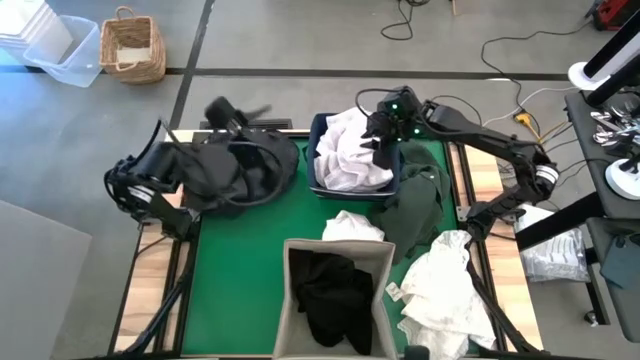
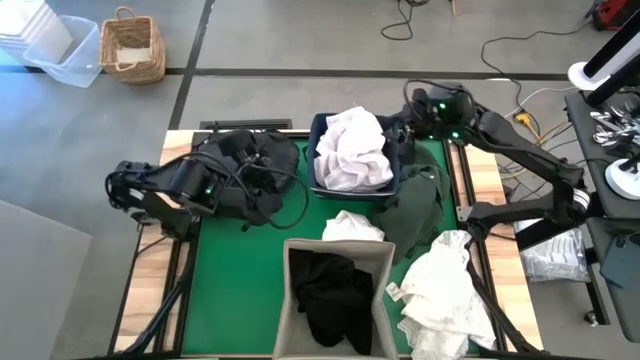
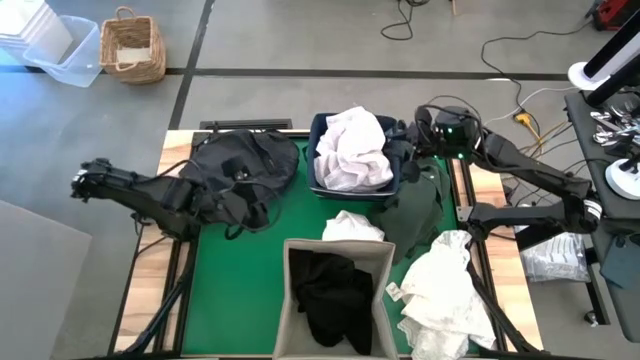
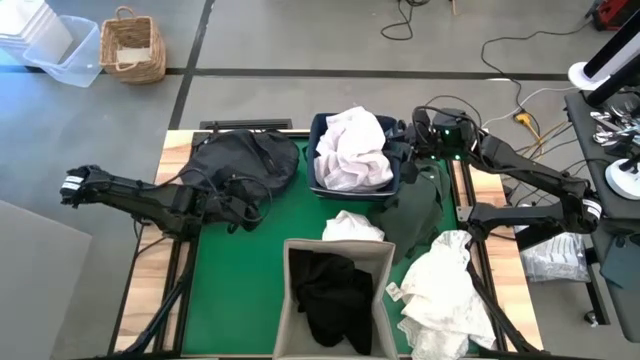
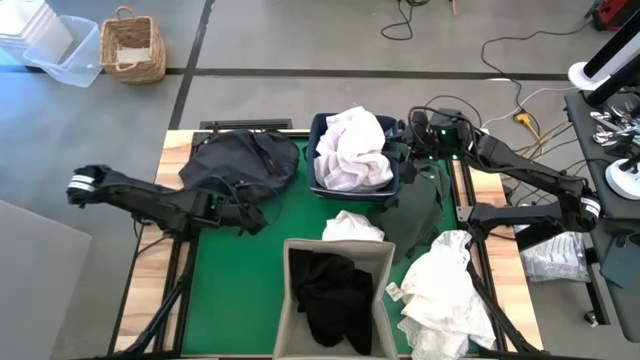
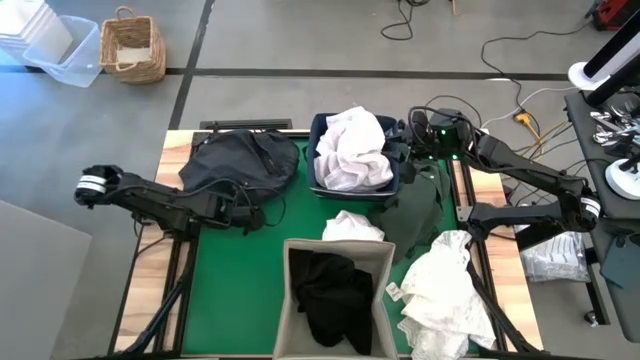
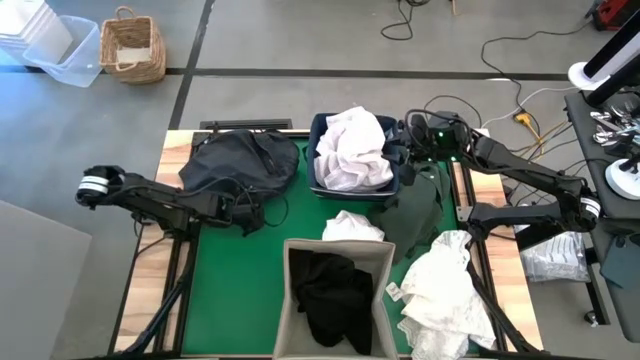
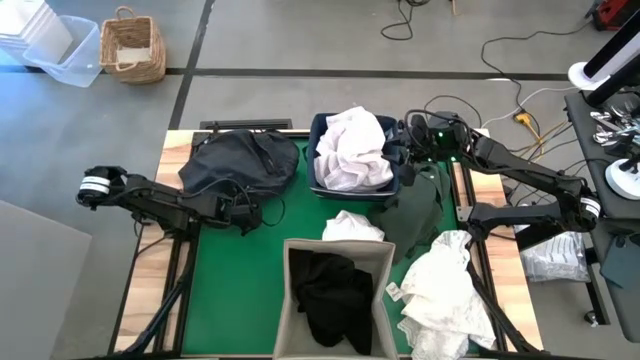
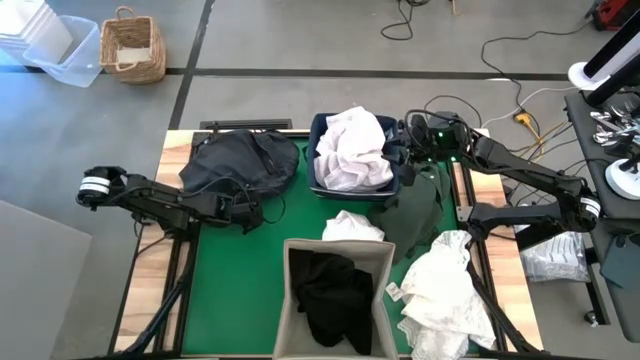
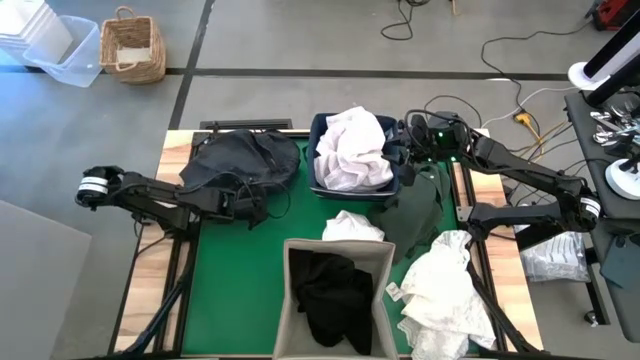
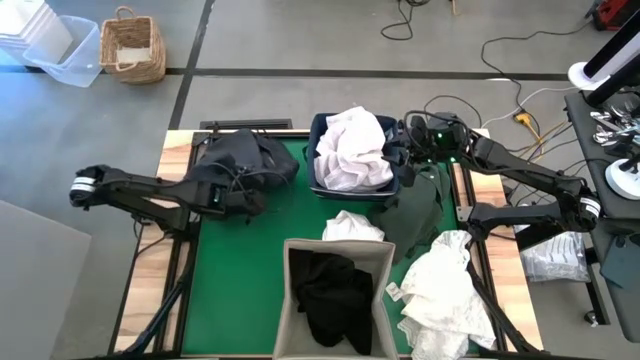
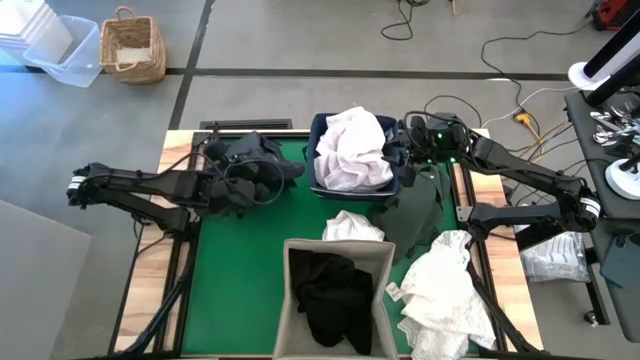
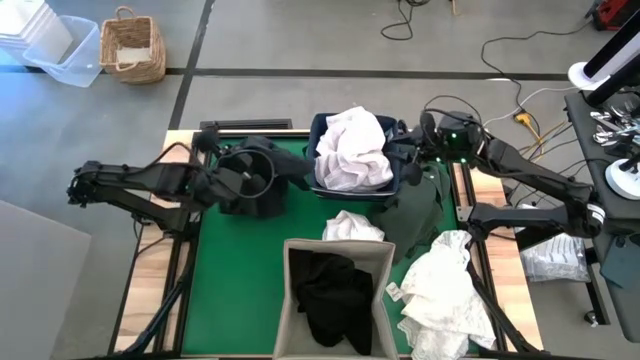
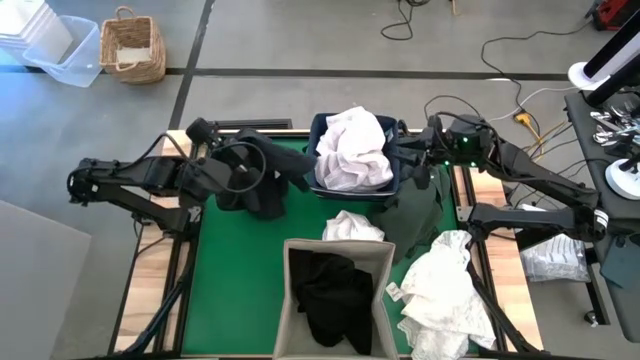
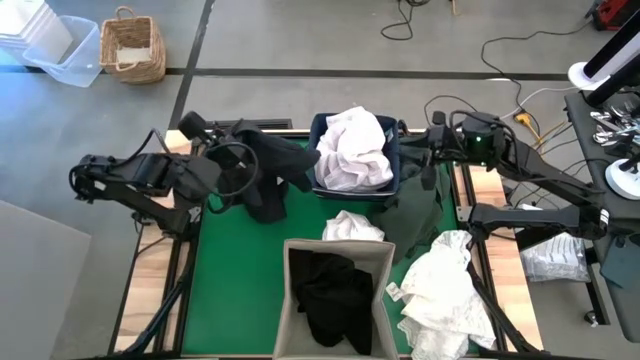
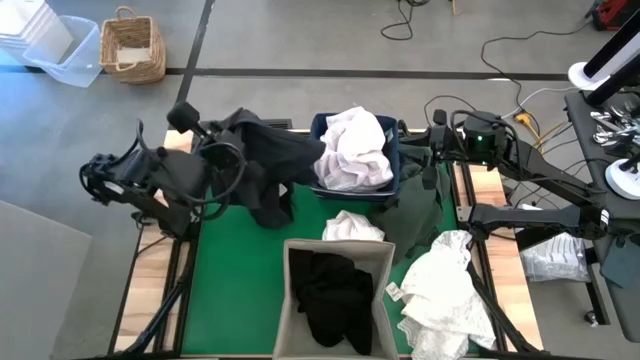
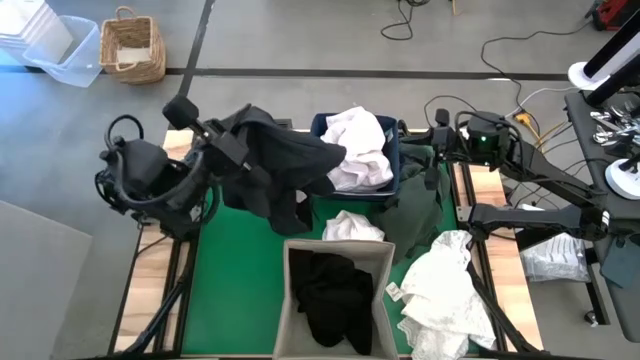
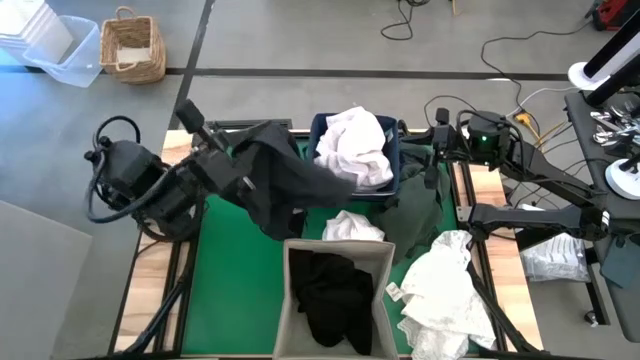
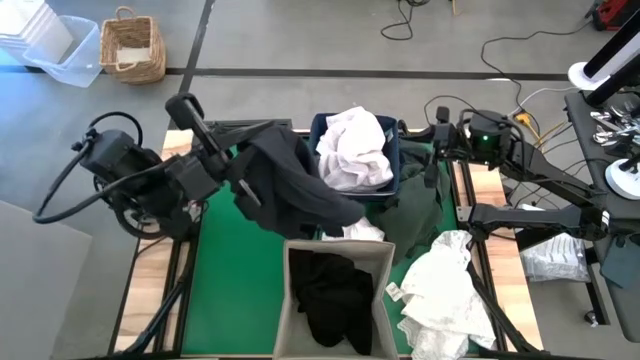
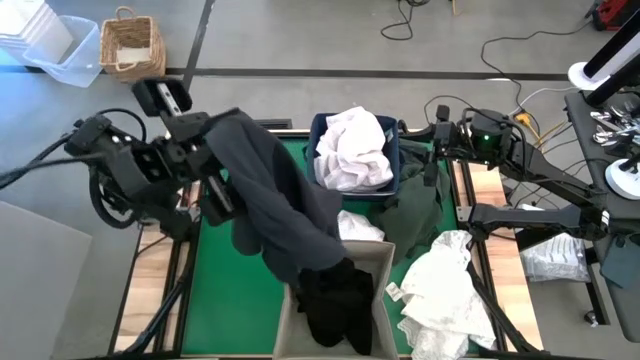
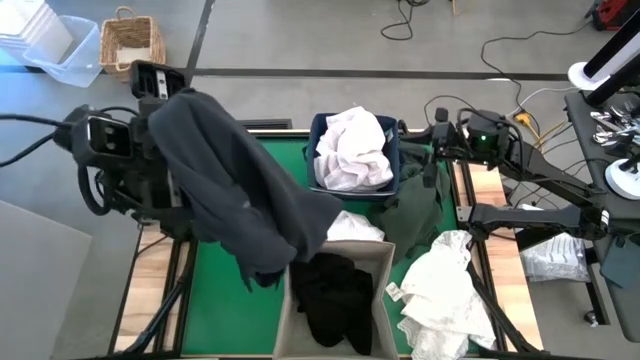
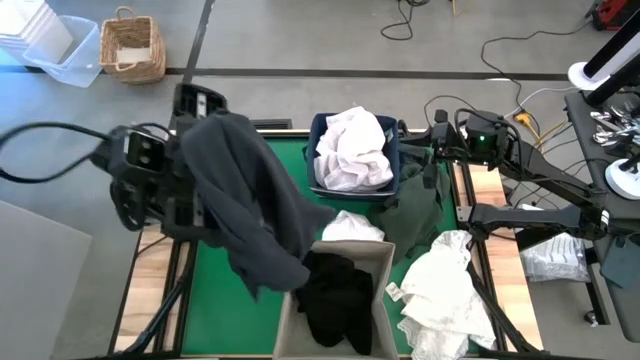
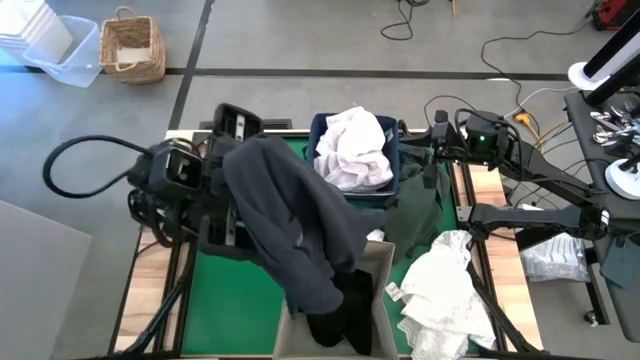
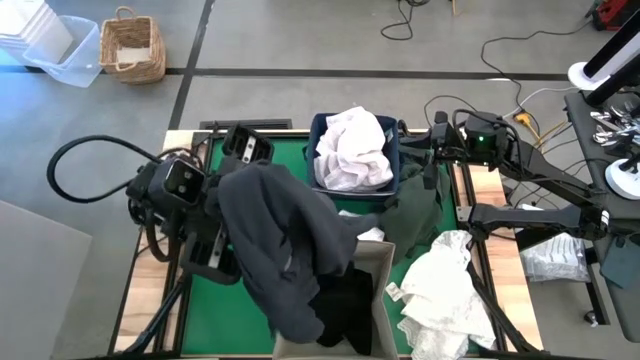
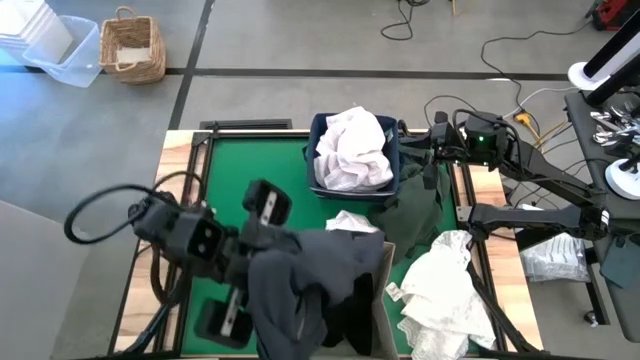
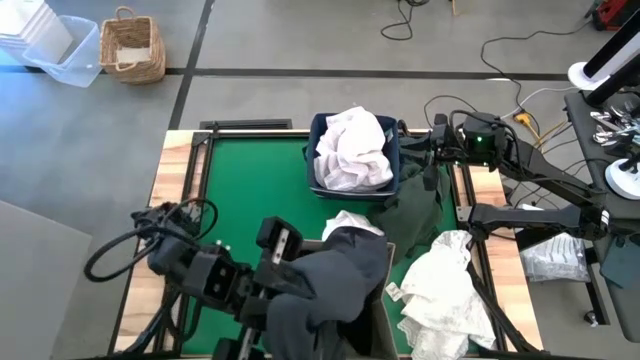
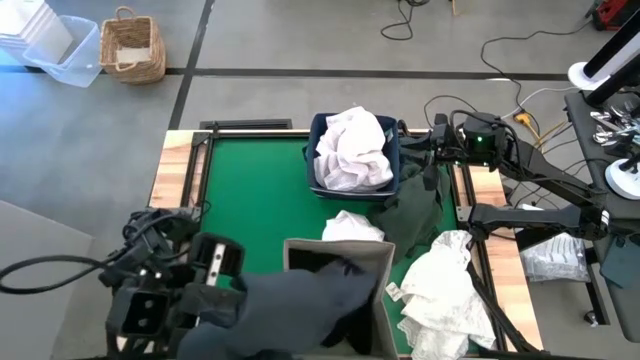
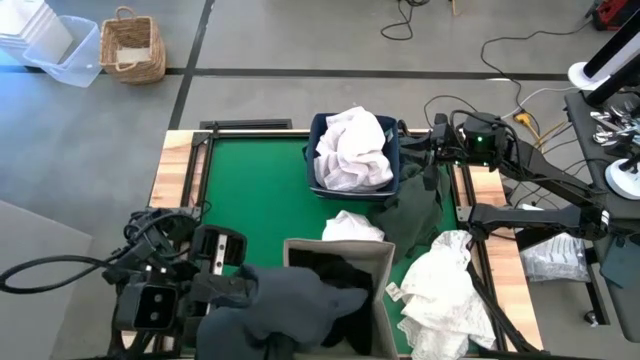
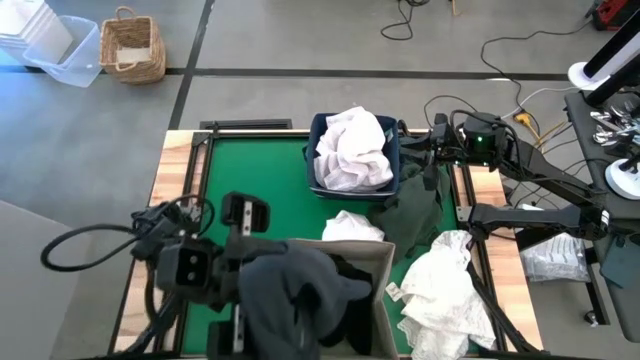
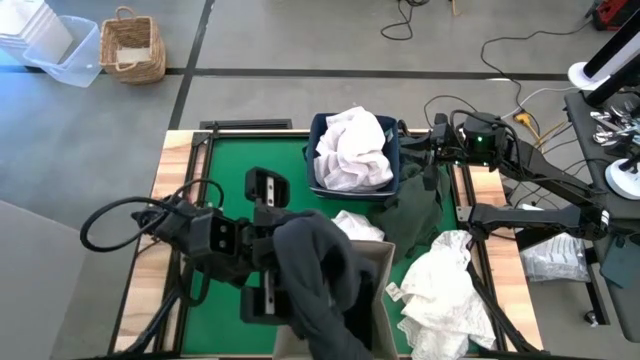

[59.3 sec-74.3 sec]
Put the blue pants into the white laundry bin
